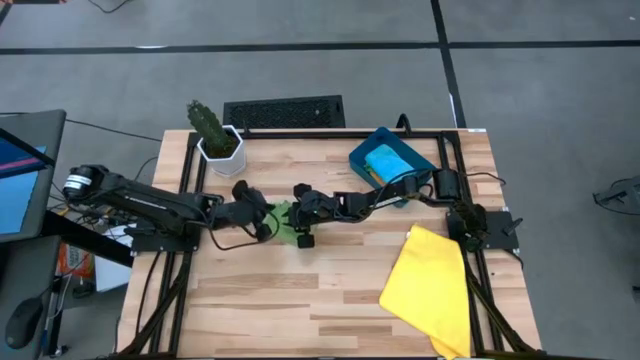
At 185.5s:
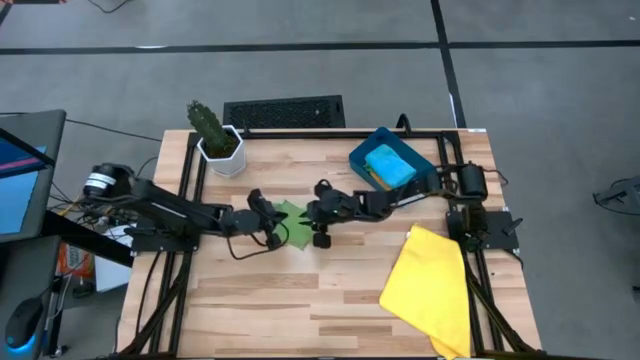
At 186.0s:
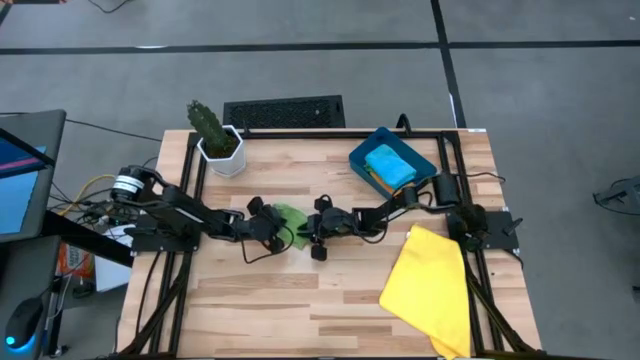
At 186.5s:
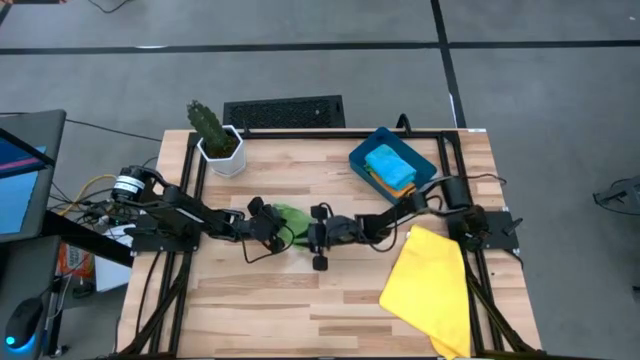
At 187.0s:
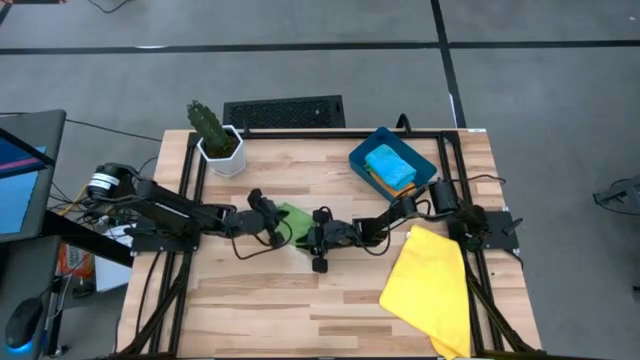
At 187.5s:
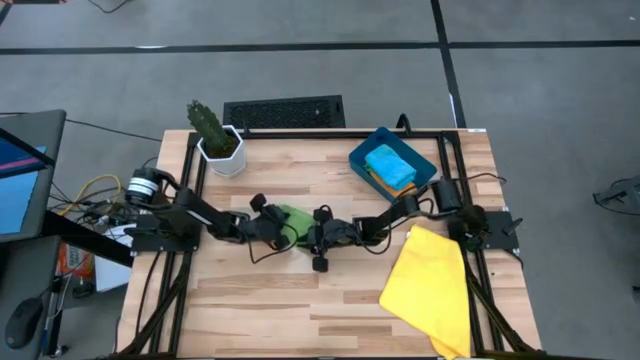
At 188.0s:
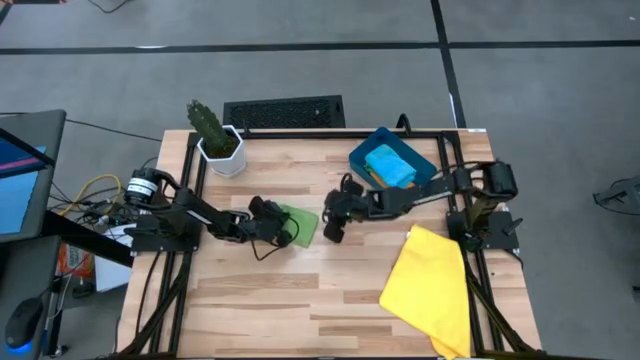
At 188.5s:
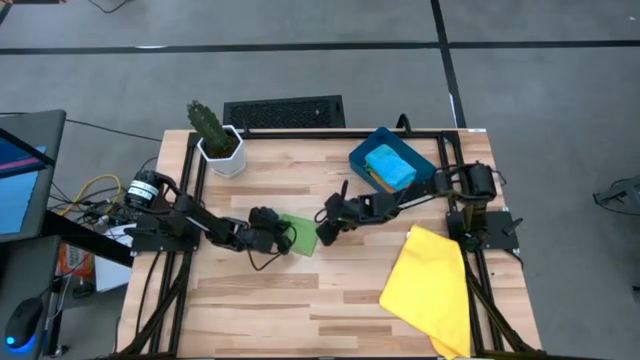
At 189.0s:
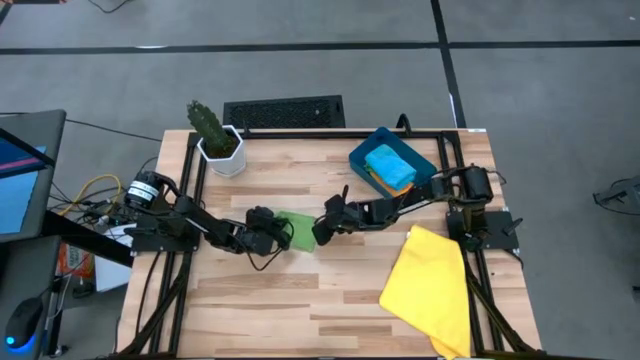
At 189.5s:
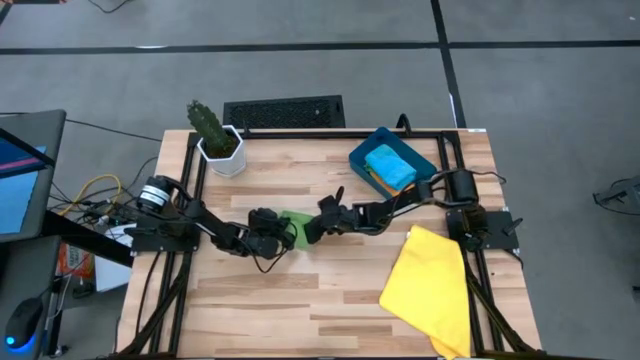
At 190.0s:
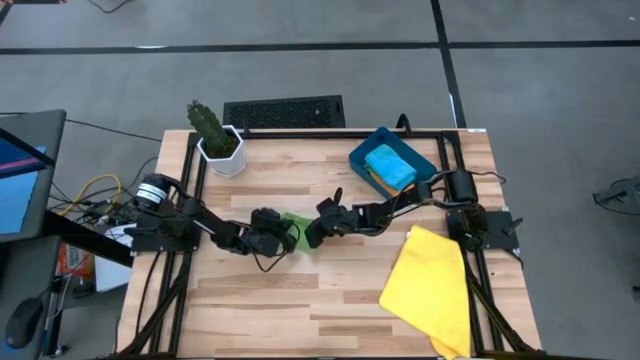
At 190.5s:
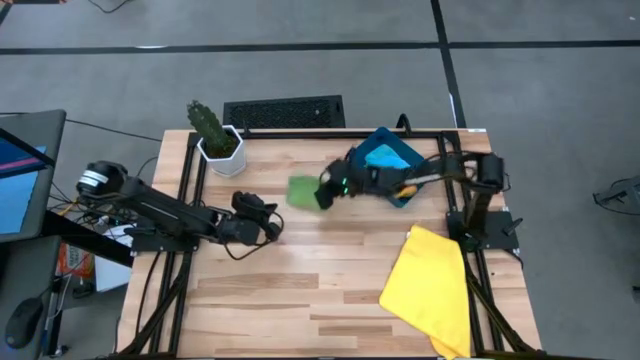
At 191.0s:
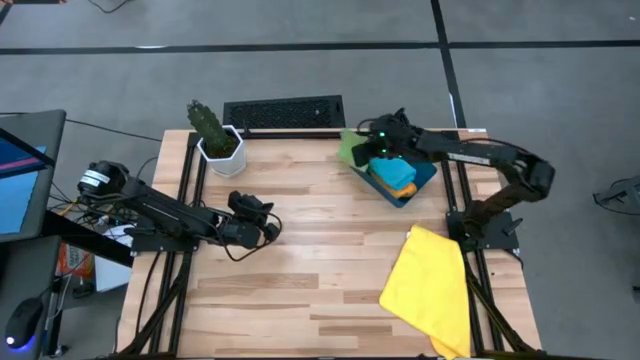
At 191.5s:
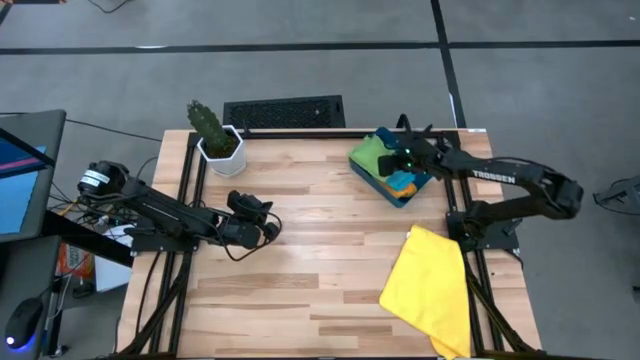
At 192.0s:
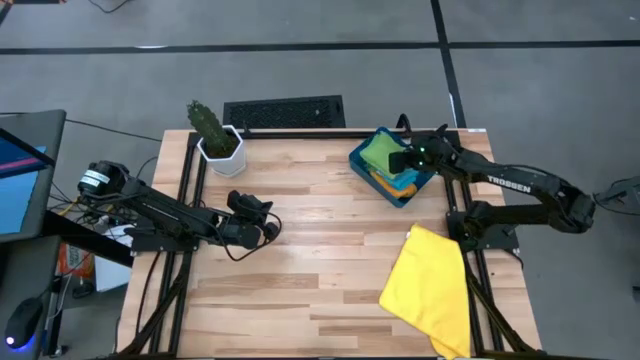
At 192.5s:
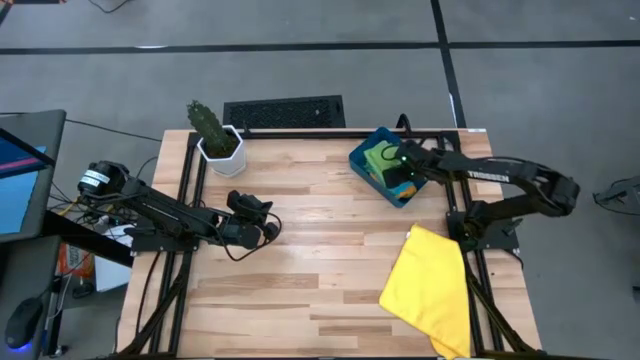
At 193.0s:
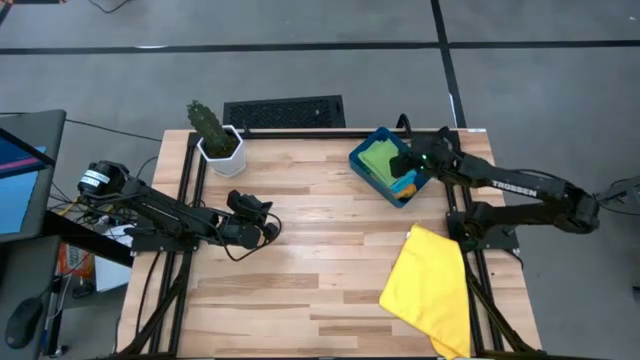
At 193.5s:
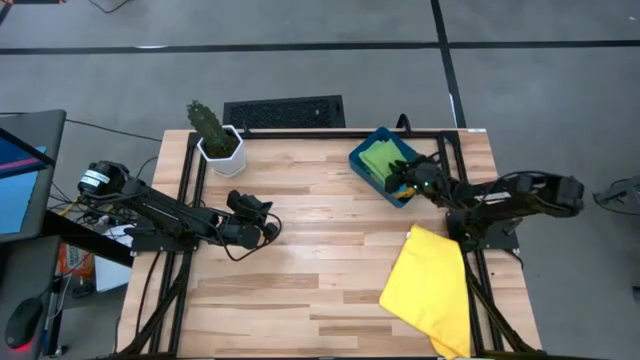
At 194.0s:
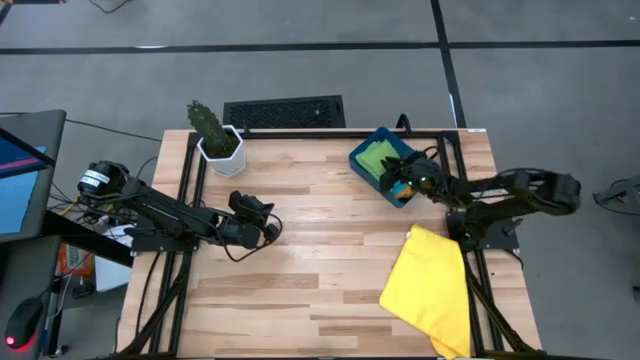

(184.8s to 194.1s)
Task: Fold microfiber towels
Put the folded green microfiber towel into the blue bin

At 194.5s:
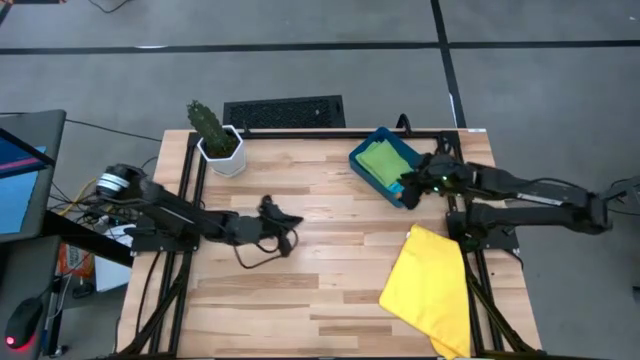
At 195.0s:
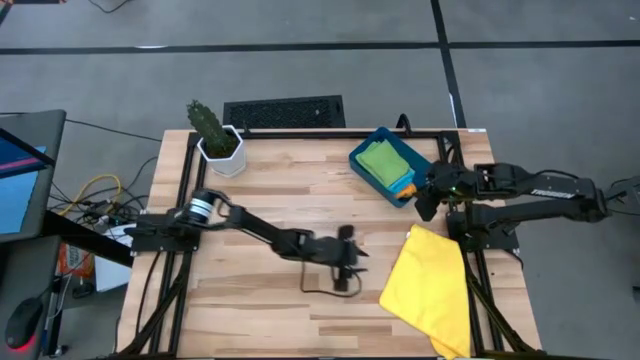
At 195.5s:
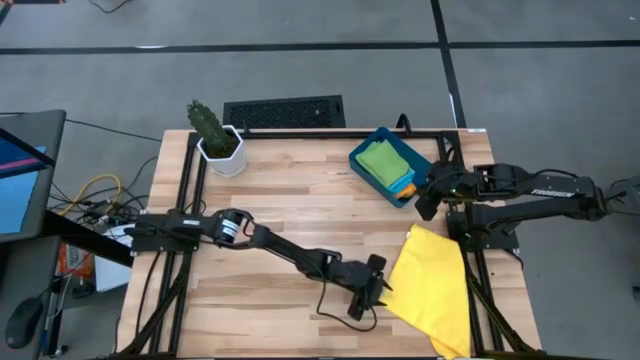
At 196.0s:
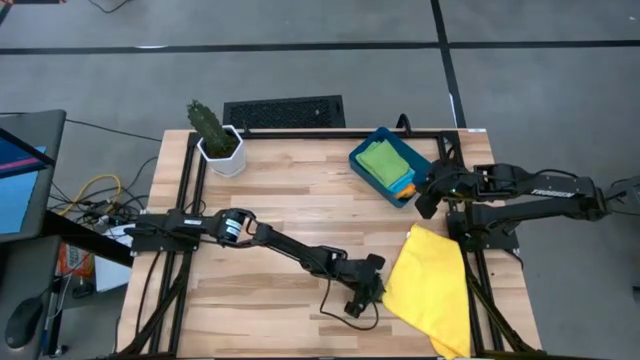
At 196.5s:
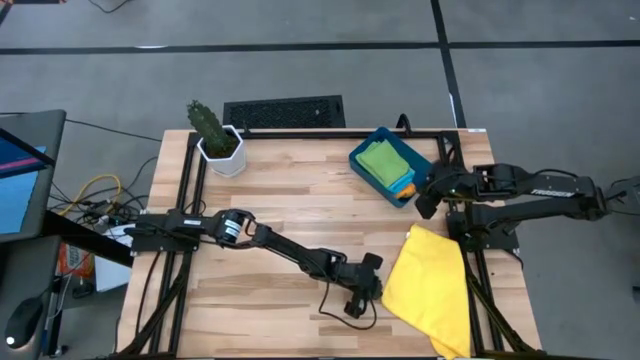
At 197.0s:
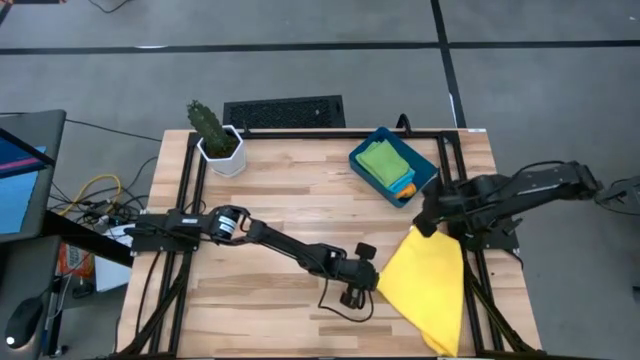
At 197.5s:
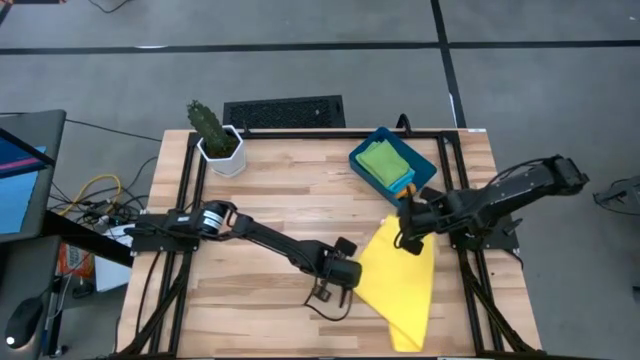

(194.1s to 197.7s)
Fold the yellow microfiber towel

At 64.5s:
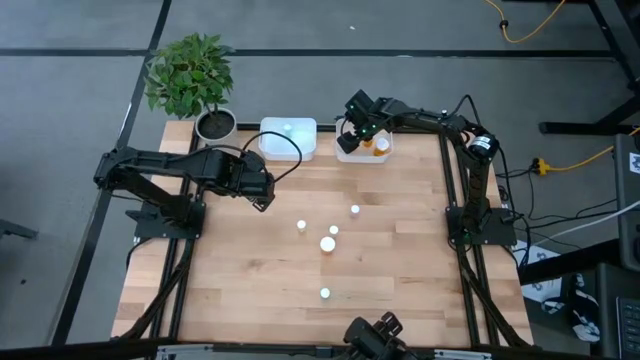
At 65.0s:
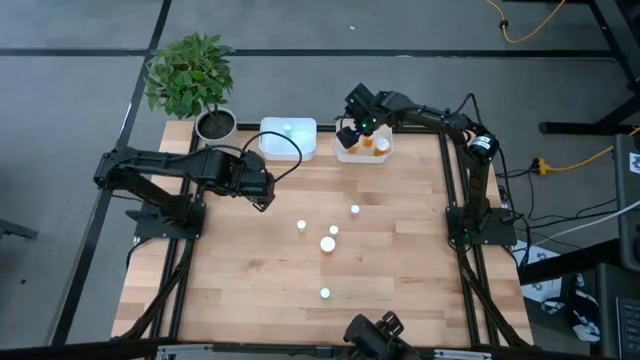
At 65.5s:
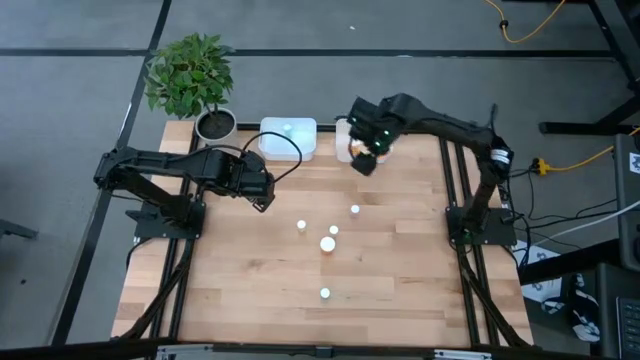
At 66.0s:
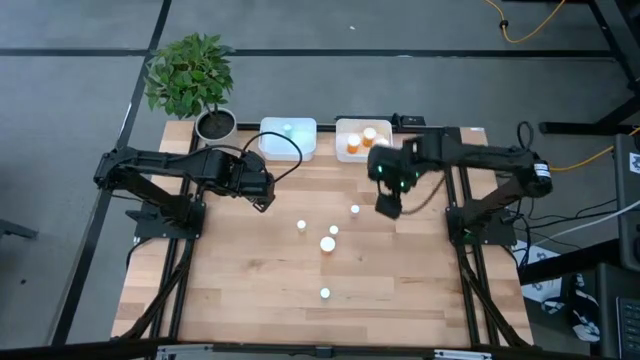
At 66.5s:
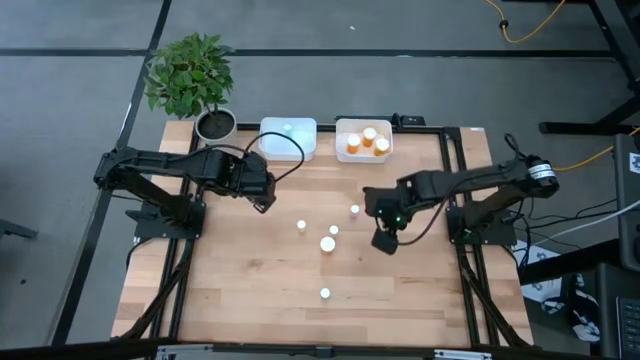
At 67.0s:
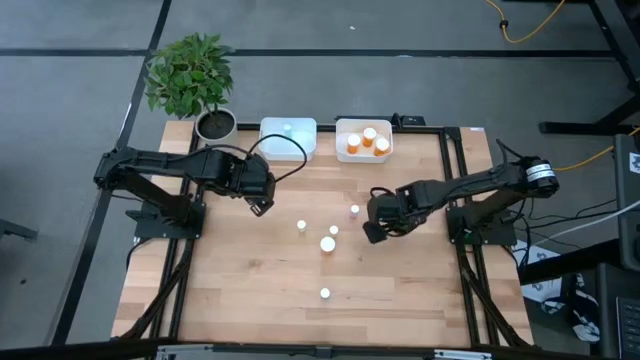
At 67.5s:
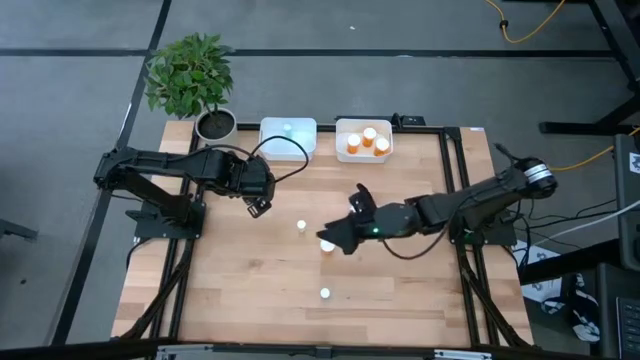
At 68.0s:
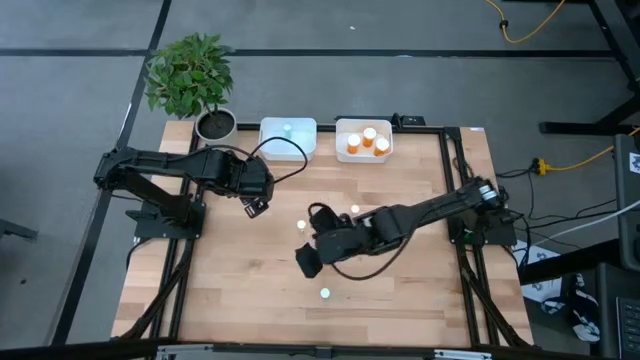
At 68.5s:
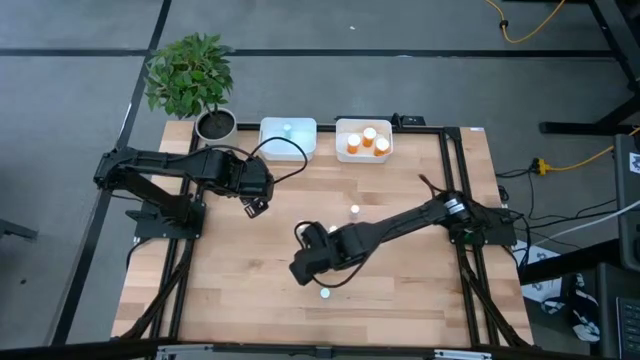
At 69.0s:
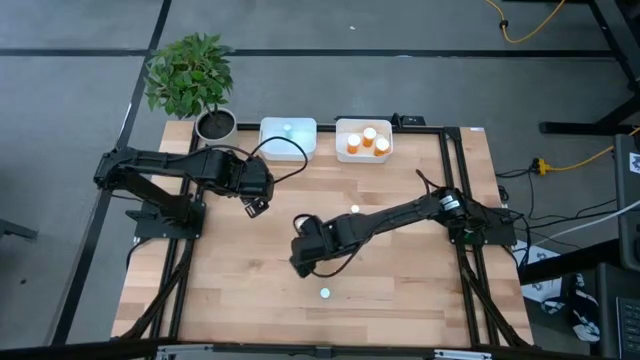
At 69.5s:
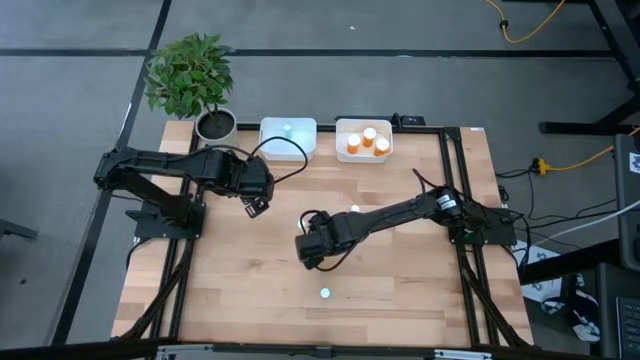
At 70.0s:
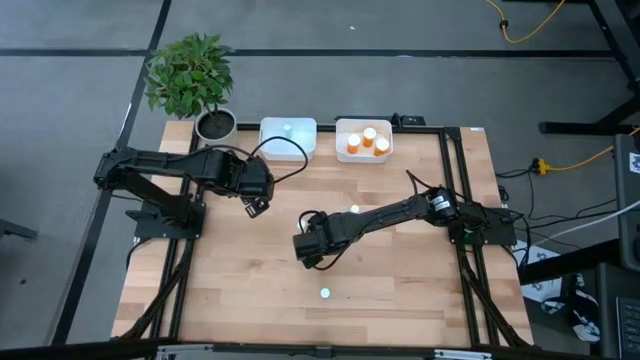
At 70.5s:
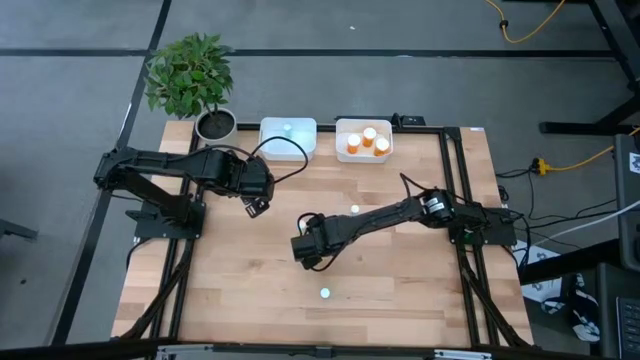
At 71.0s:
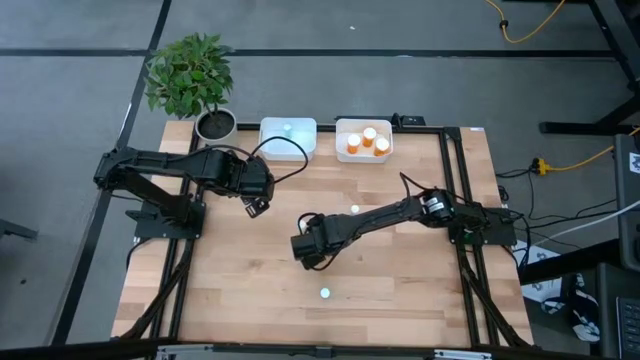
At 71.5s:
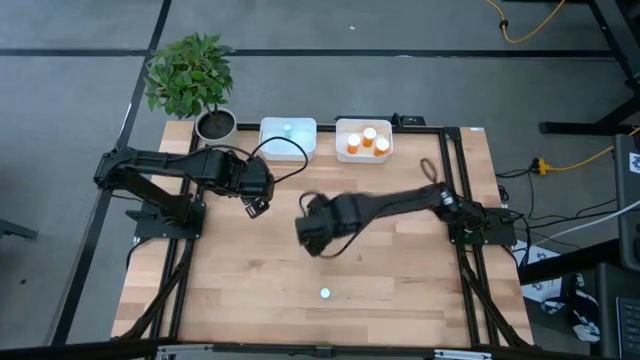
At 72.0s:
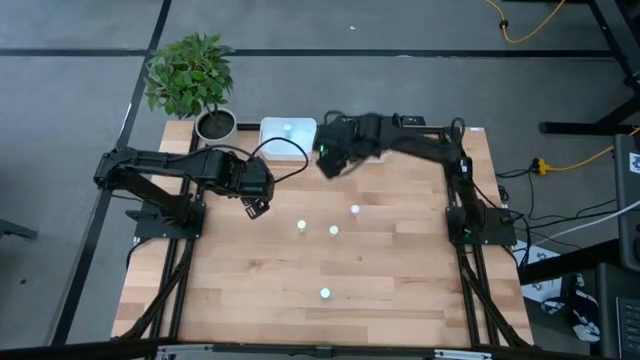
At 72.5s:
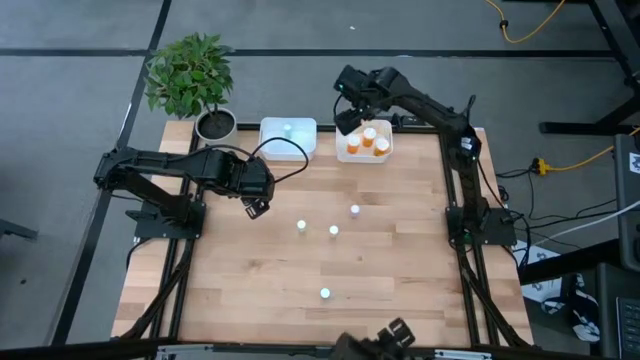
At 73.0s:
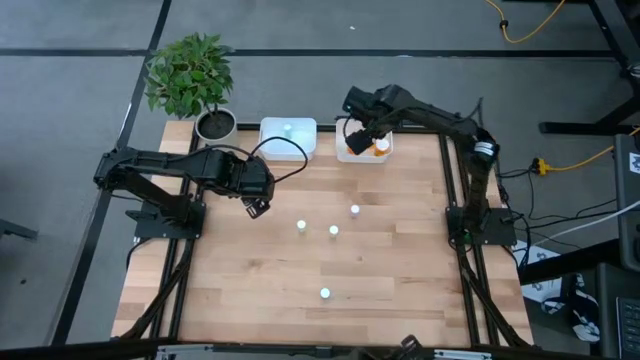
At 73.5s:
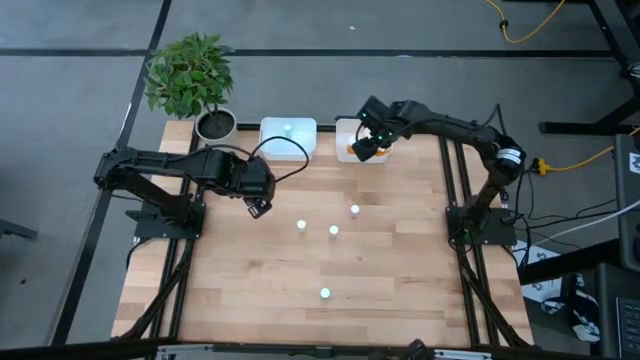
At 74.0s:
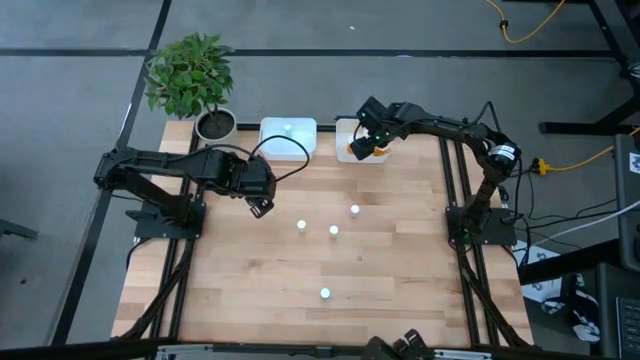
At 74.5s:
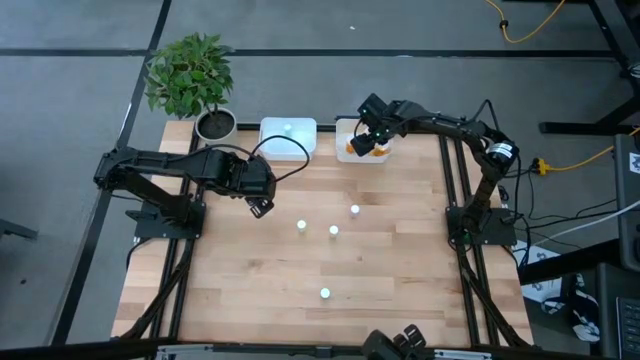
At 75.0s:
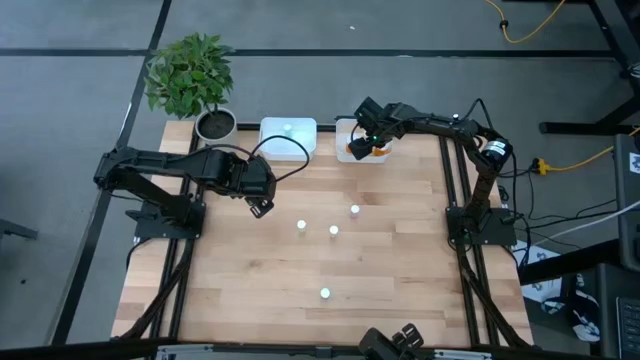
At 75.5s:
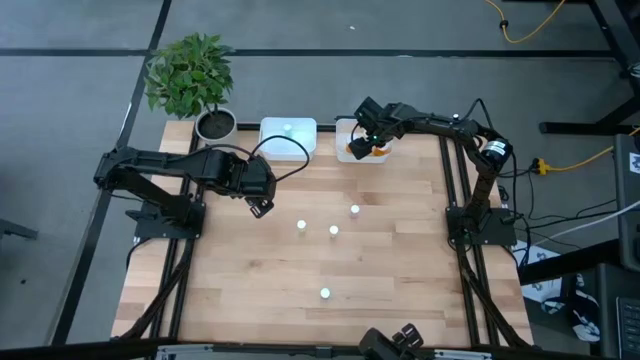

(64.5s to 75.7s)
Task: Pick and place medicine bottles into bin by pill shape (circle, oval)
Put the orange capsule bottle into the right white bin
